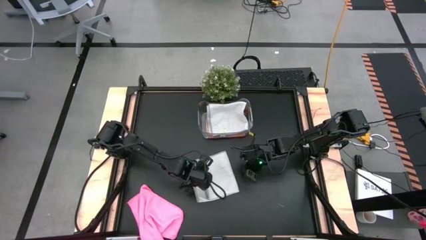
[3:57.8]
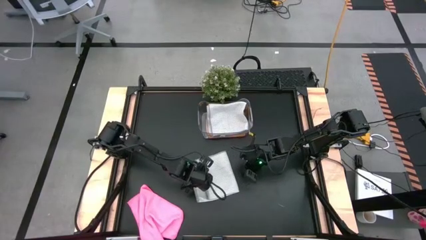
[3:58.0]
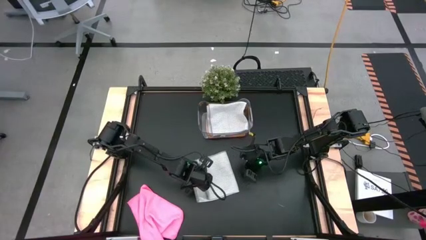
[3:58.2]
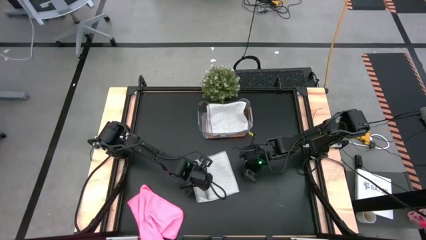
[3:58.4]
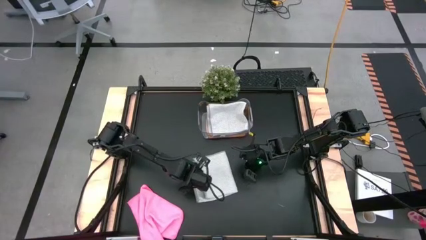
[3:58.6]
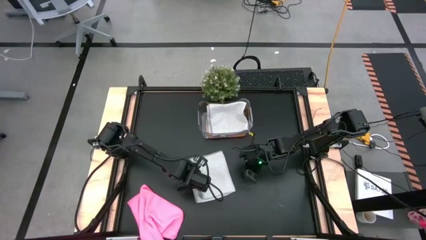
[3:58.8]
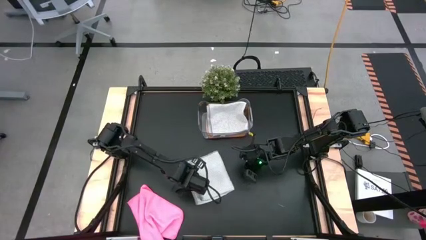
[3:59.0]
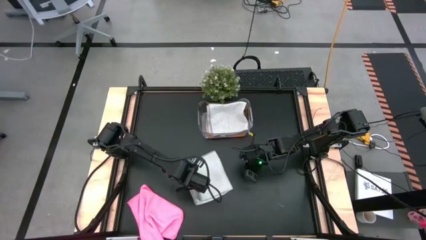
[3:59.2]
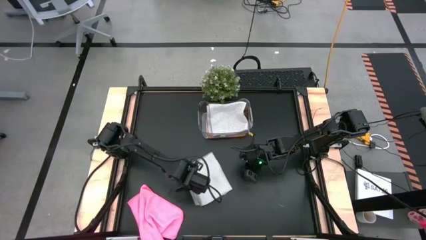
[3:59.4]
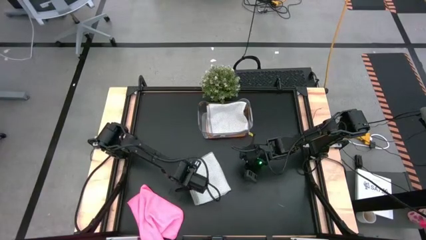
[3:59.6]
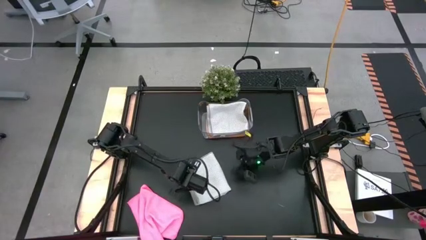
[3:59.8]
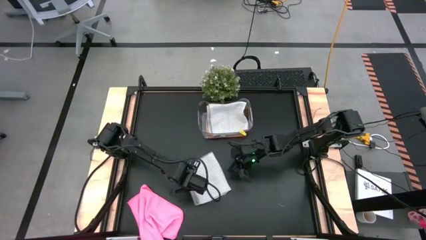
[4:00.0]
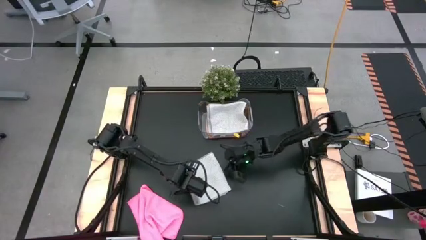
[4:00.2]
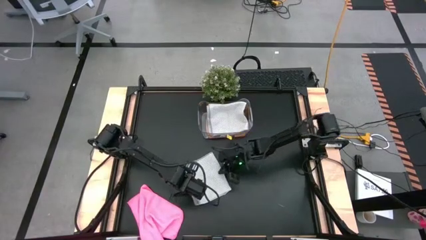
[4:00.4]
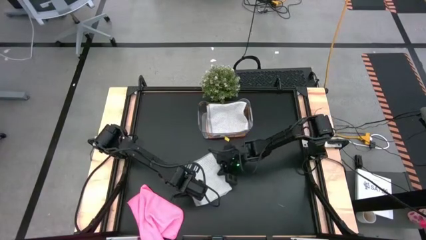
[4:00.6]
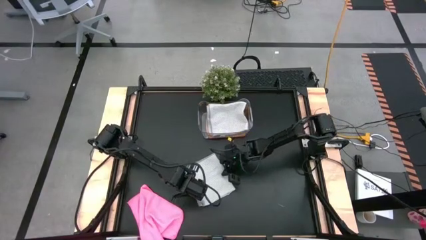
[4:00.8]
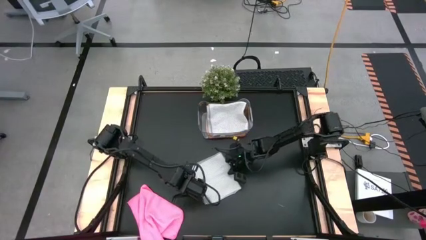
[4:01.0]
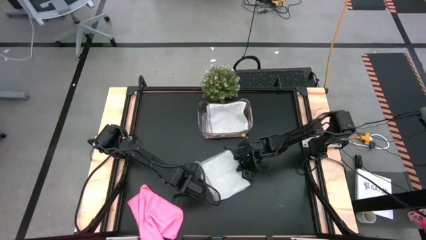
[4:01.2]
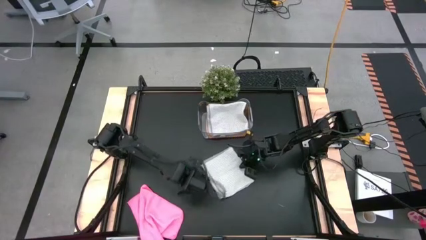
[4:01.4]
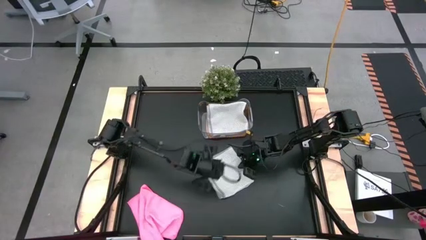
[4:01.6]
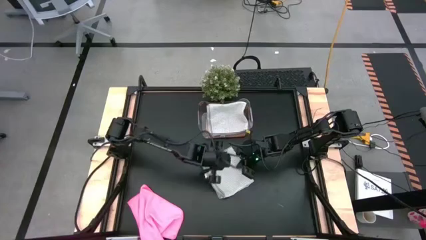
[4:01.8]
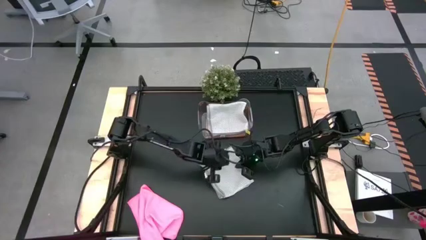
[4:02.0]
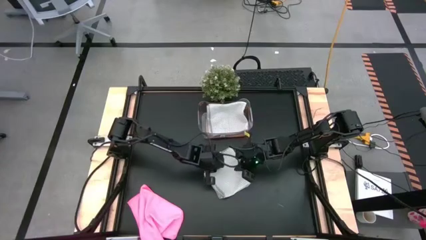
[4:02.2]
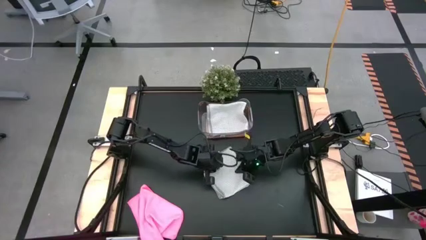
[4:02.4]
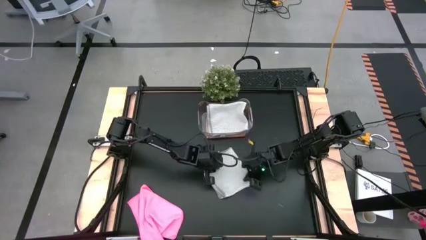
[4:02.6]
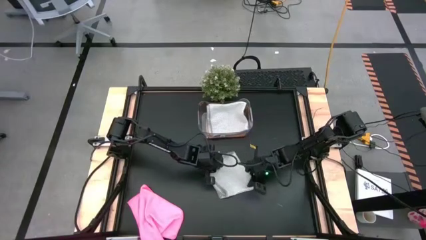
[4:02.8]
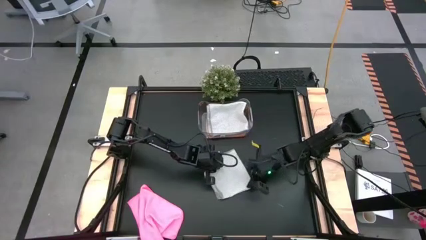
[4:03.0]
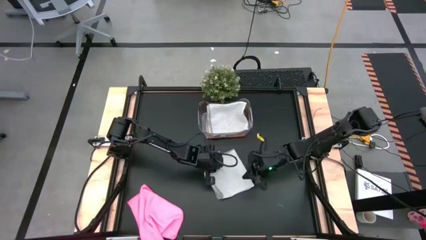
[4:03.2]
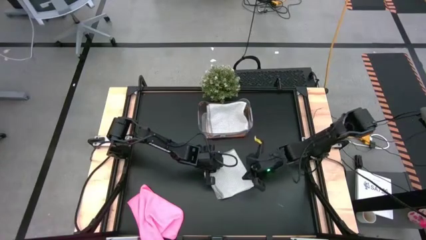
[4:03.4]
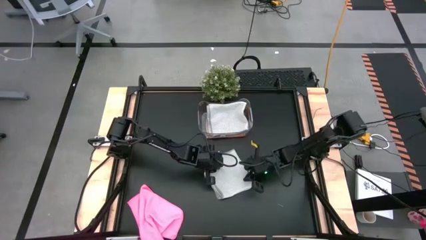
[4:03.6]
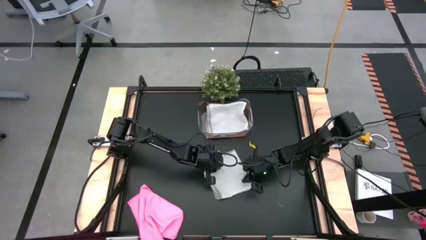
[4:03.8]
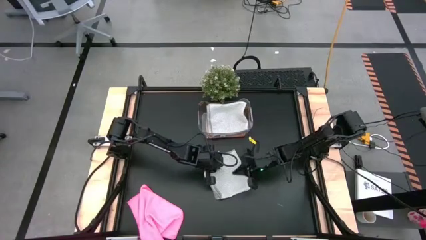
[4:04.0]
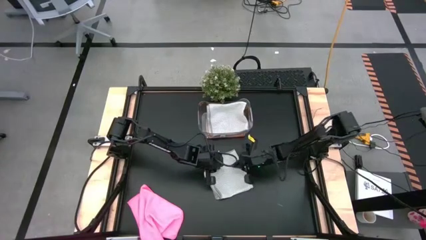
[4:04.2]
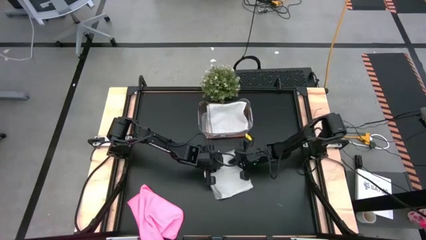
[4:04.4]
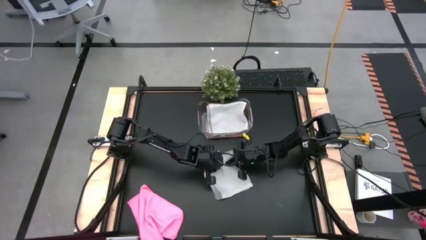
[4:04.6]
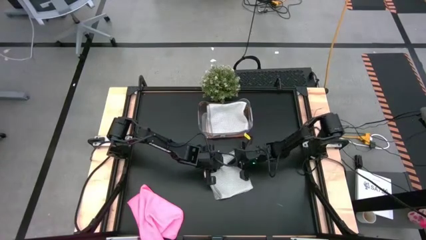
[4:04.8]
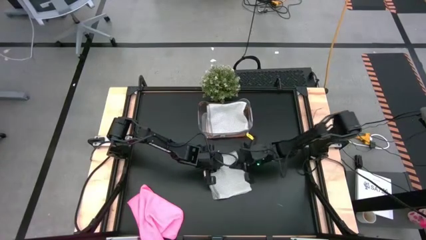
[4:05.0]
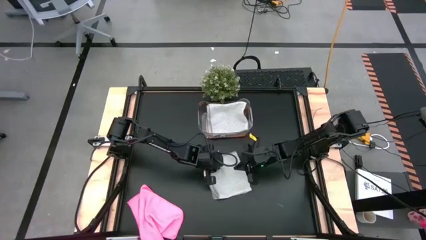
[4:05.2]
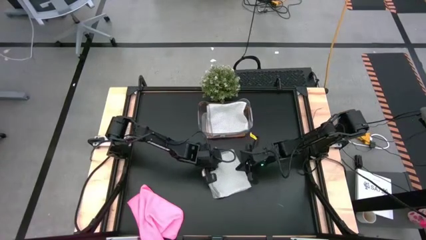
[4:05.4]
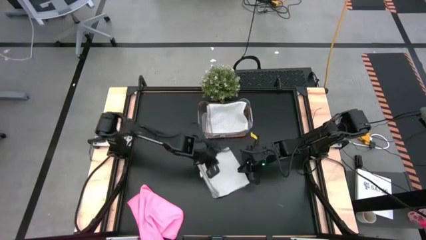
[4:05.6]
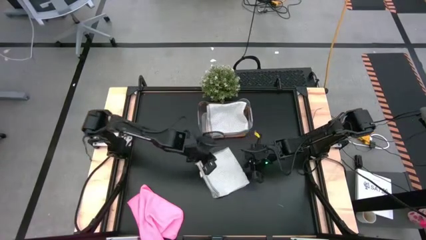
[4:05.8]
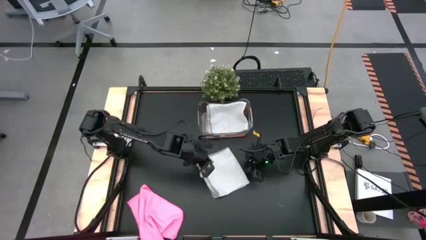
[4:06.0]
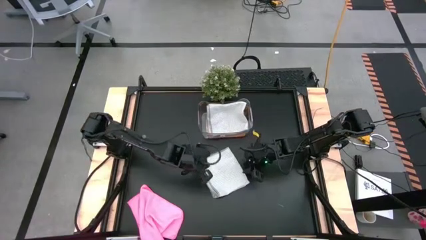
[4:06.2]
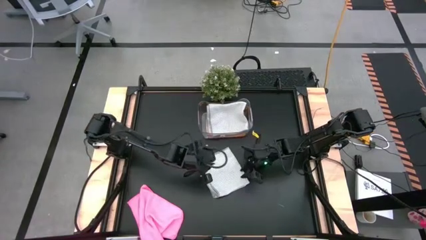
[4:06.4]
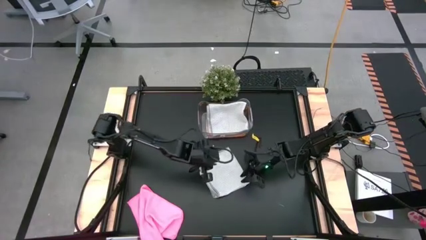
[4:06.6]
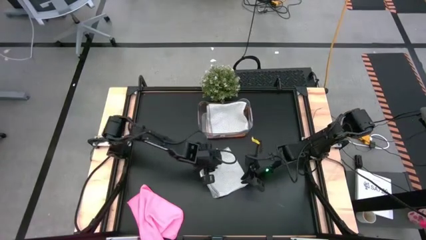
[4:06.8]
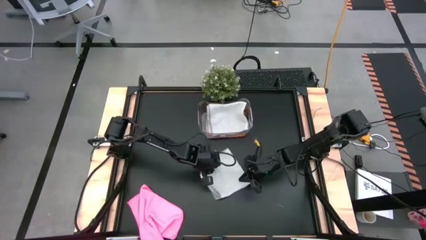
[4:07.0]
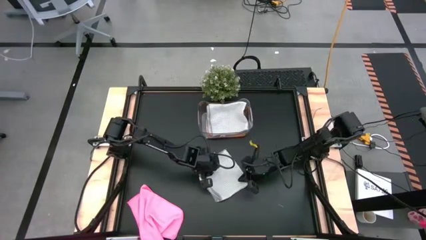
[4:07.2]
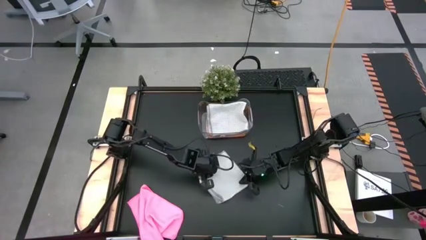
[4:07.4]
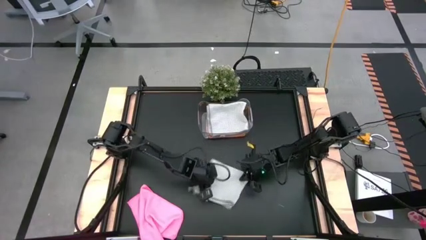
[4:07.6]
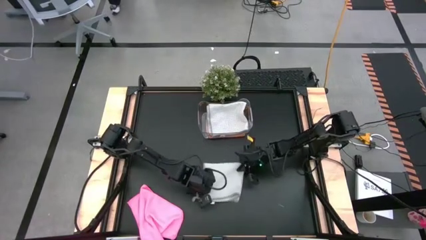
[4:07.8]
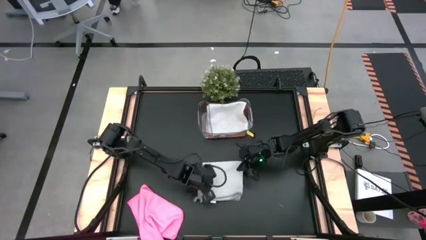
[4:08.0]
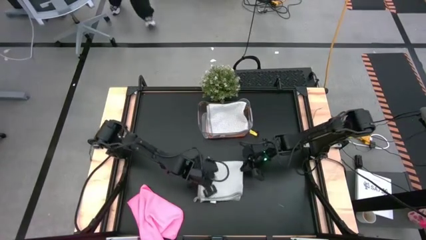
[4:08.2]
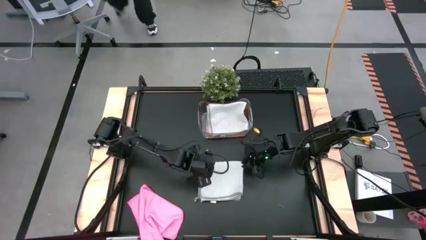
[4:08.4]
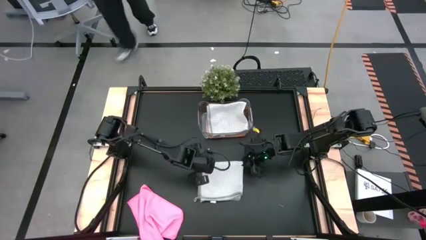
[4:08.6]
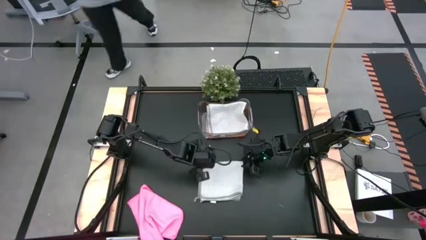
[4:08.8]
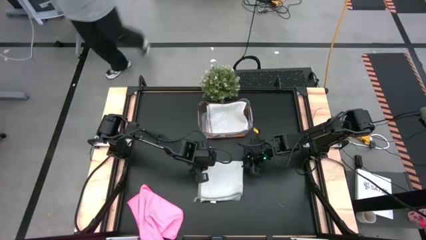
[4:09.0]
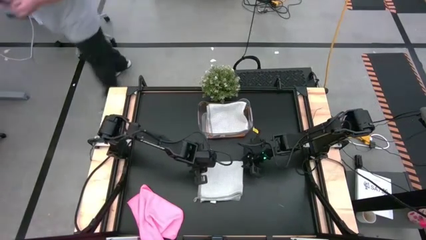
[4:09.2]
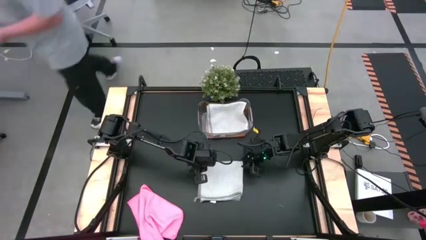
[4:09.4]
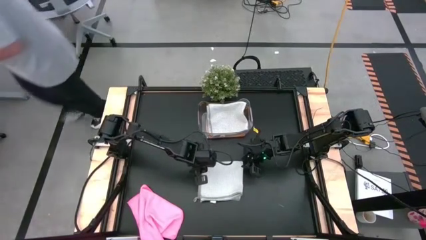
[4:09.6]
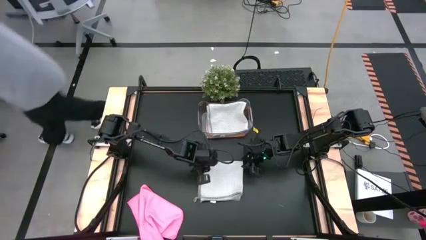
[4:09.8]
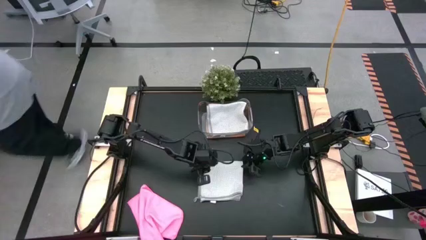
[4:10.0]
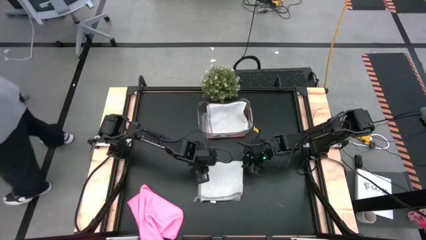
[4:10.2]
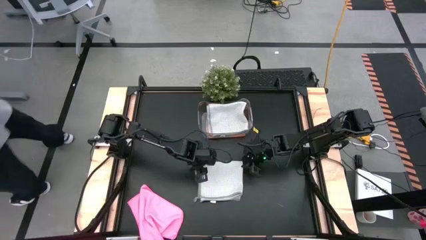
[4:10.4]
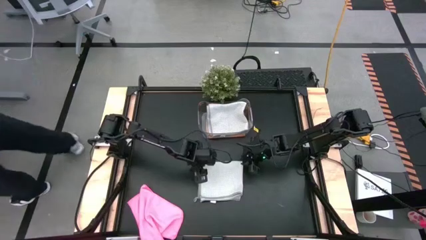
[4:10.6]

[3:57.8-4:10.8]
Task: Fold microfiber towels
Fold the gray microfiber towel on the table

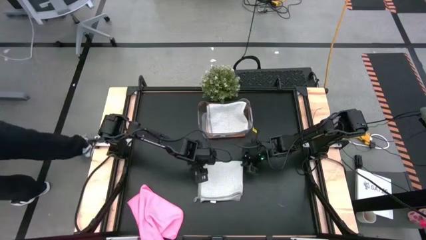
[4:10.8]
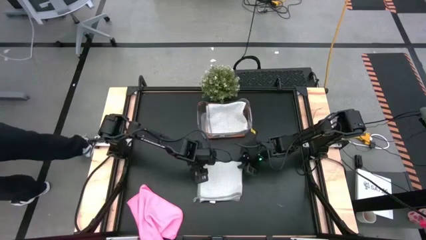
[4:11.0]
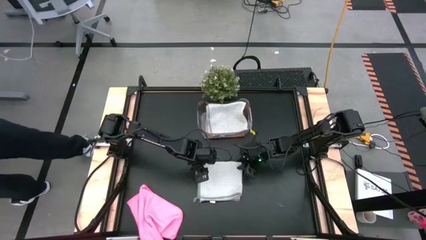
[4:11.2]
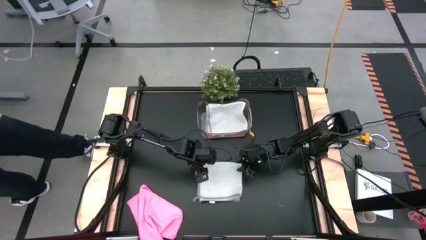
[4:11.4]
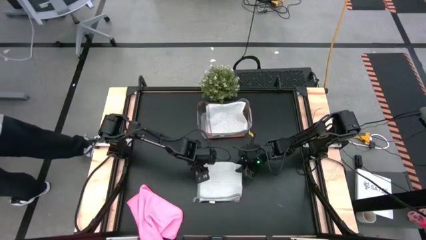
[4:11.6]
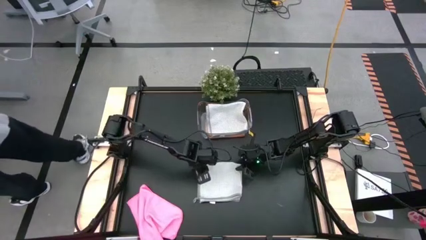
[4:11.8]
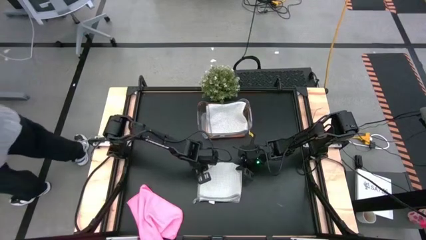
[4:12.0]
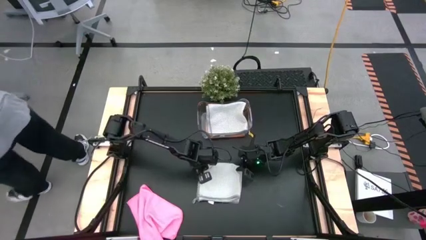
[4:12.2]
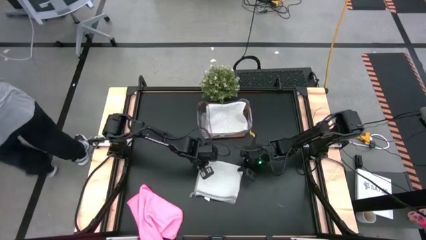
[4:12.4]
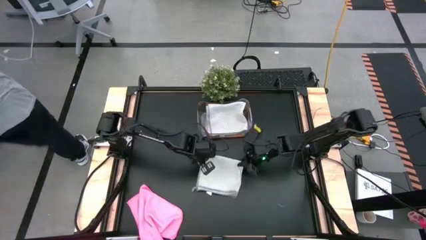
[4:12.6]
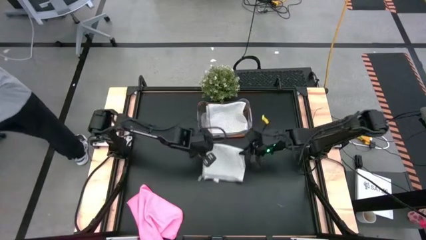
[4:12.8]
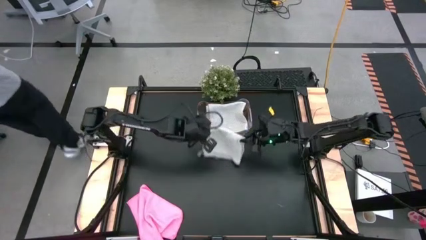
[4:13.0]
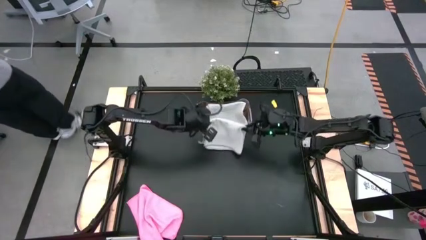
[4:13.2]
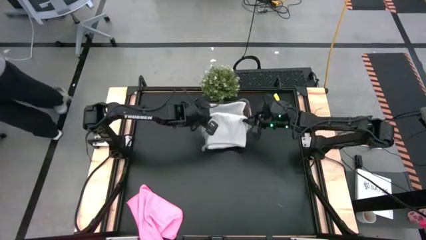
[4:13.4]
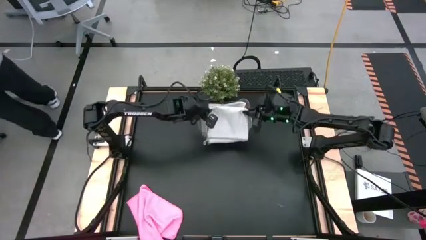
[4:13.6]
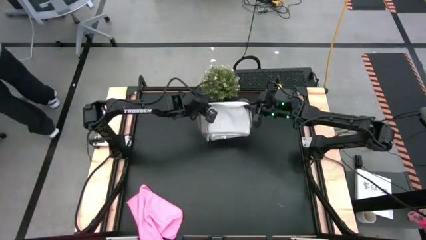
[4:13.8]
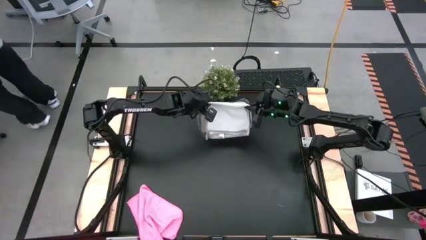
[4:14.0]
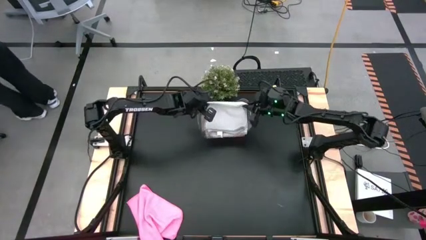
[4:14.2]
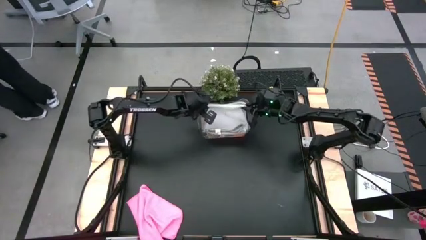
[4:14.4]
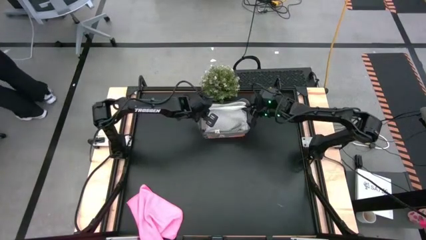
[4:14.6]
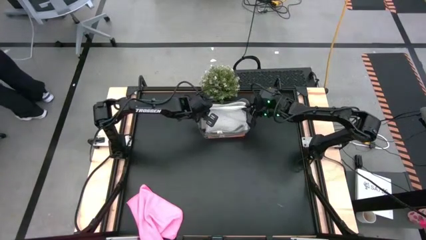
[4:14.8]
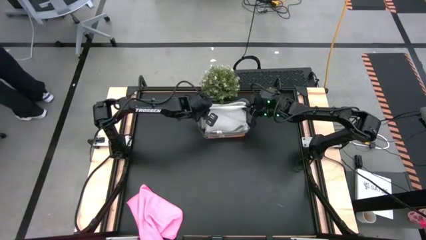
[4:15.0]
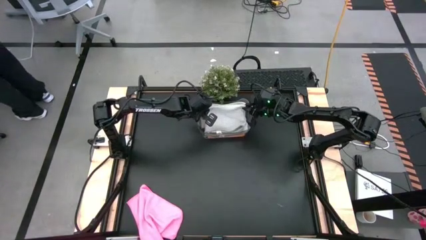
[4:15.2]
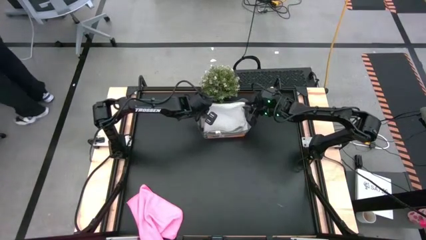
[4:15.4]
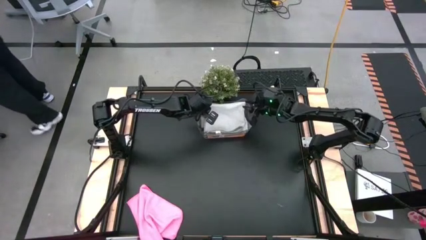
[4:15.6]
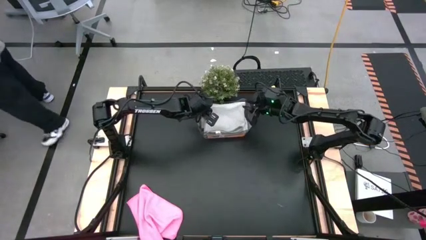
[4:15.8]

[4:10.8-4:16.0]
Put the gray microfiber towel into the transparent bin
